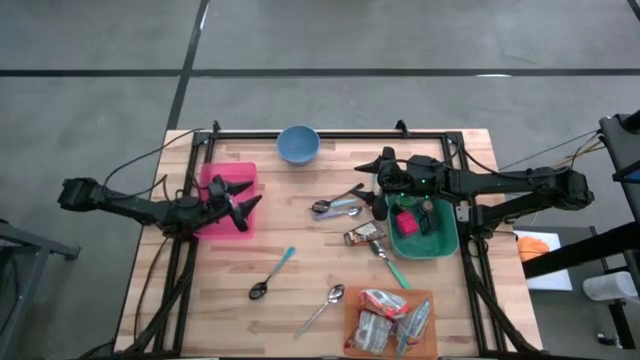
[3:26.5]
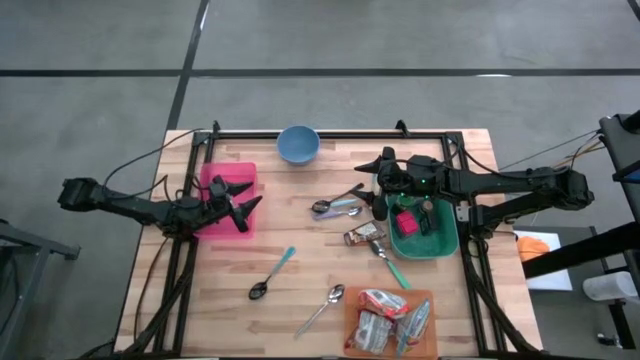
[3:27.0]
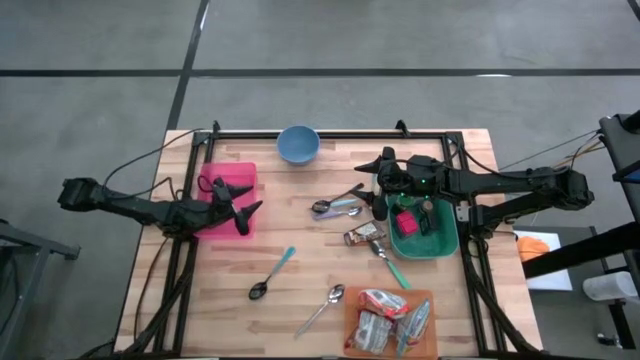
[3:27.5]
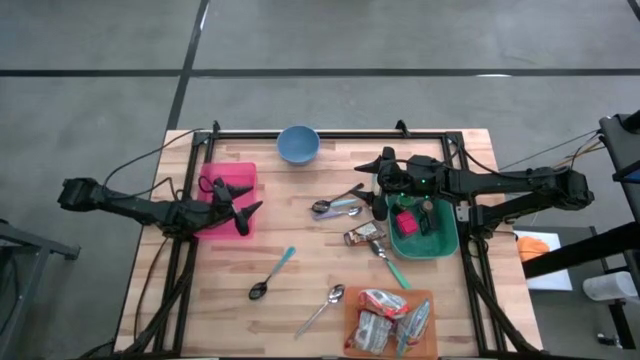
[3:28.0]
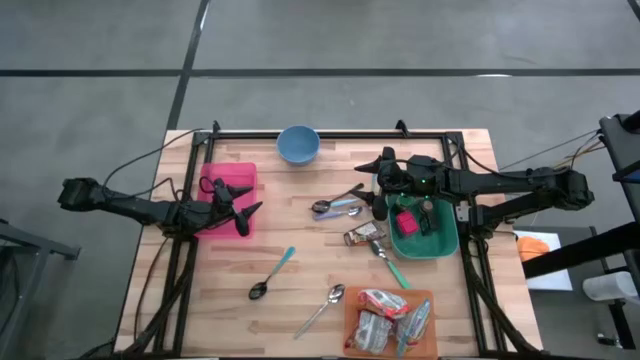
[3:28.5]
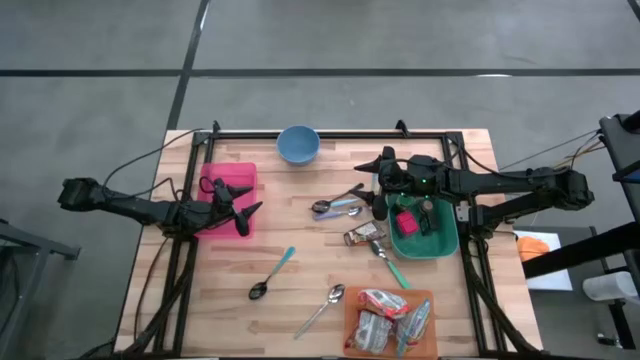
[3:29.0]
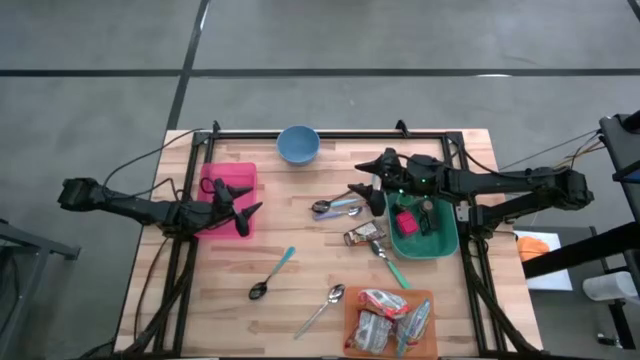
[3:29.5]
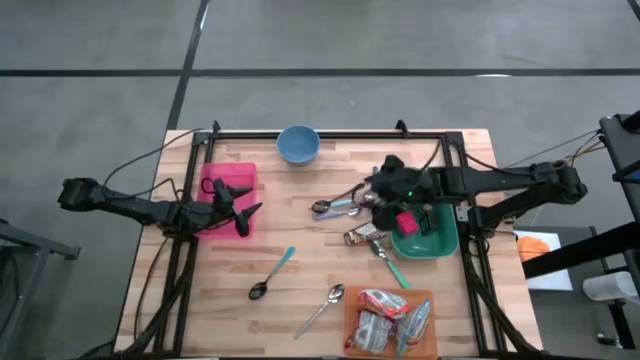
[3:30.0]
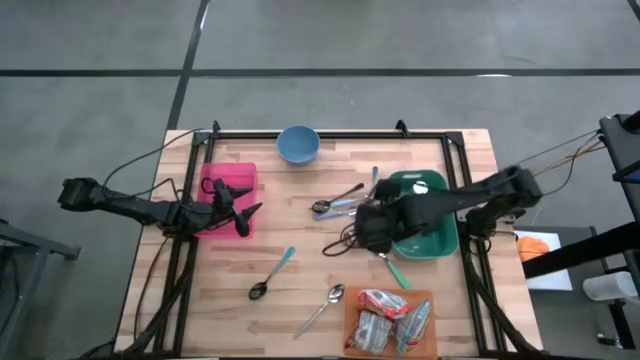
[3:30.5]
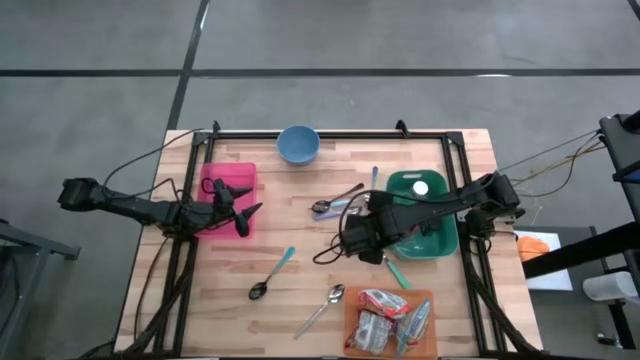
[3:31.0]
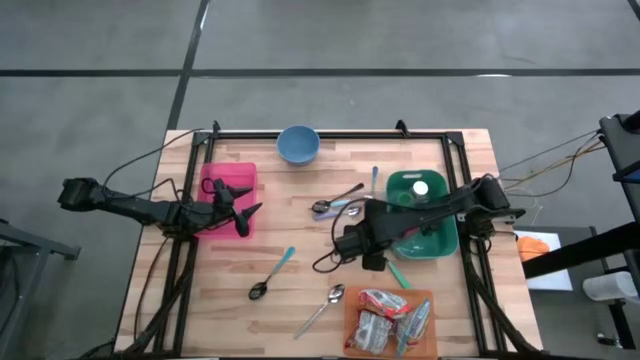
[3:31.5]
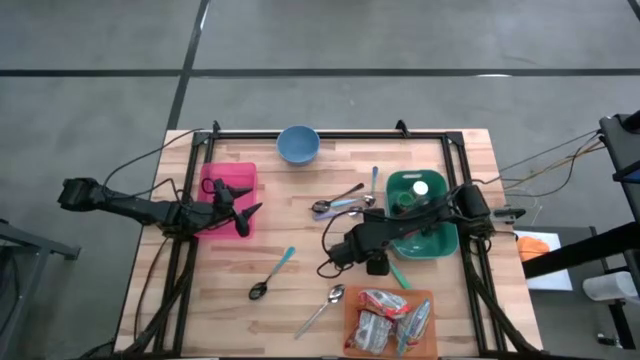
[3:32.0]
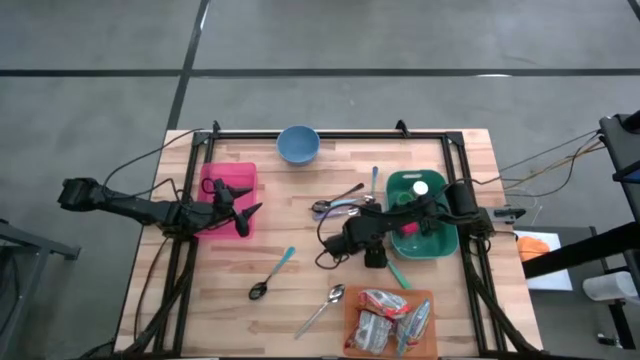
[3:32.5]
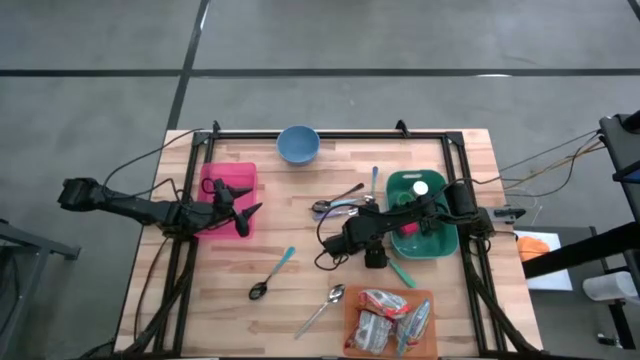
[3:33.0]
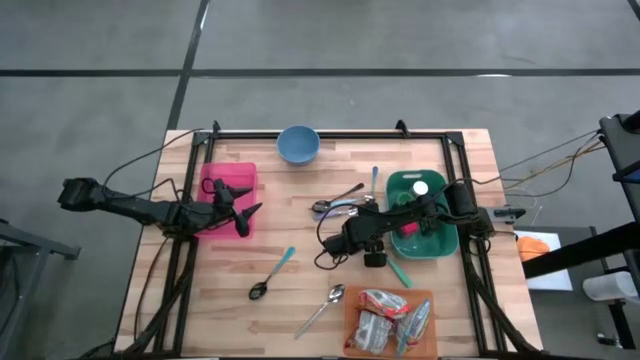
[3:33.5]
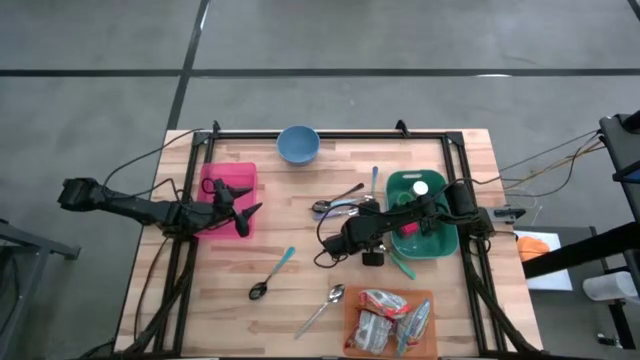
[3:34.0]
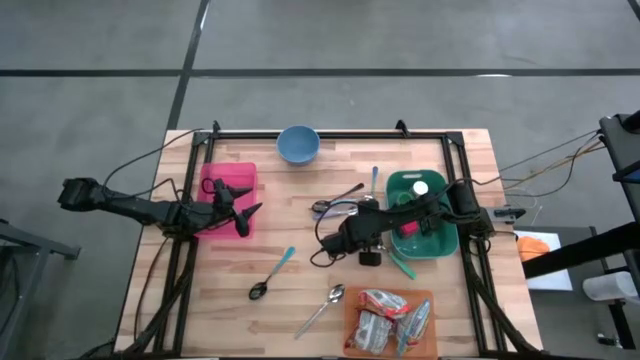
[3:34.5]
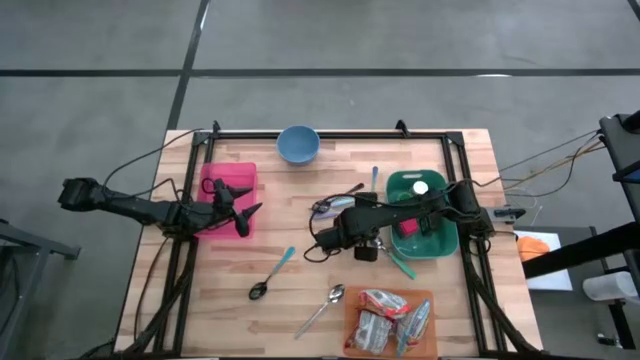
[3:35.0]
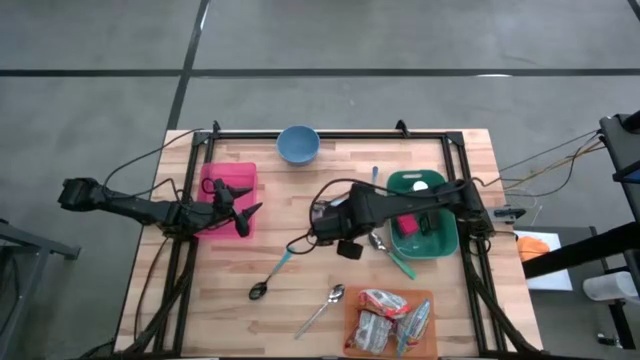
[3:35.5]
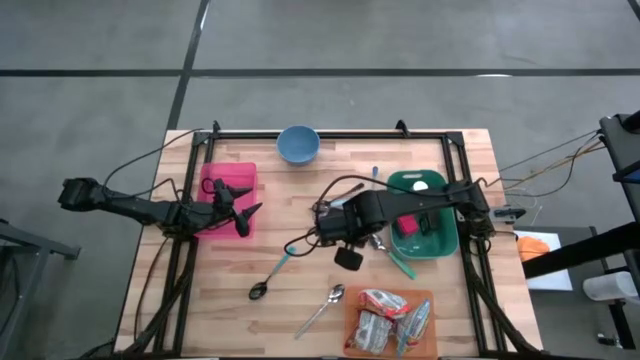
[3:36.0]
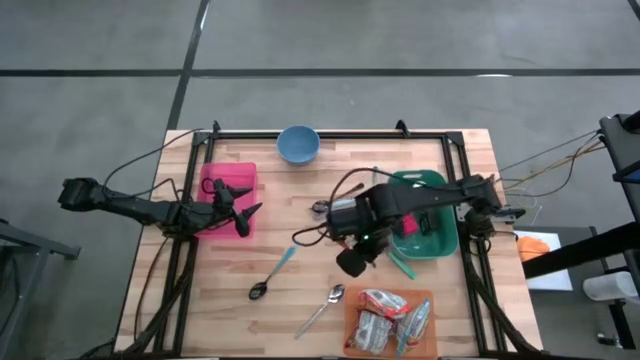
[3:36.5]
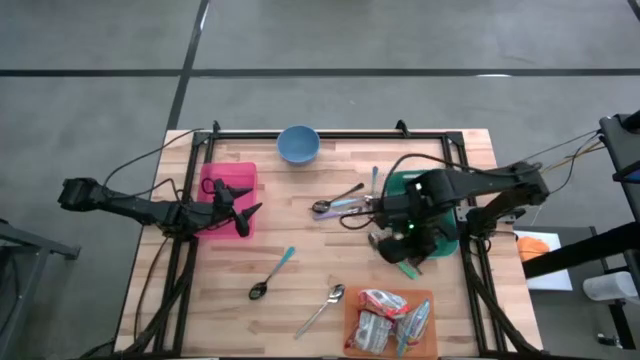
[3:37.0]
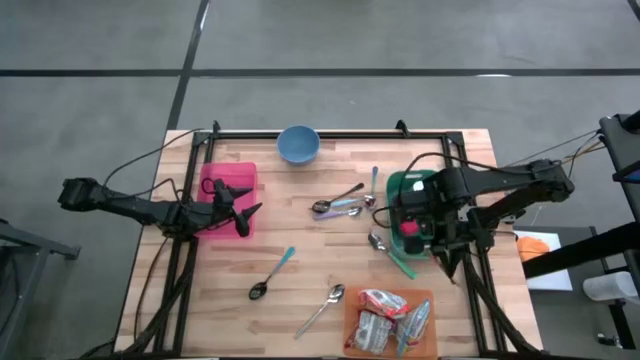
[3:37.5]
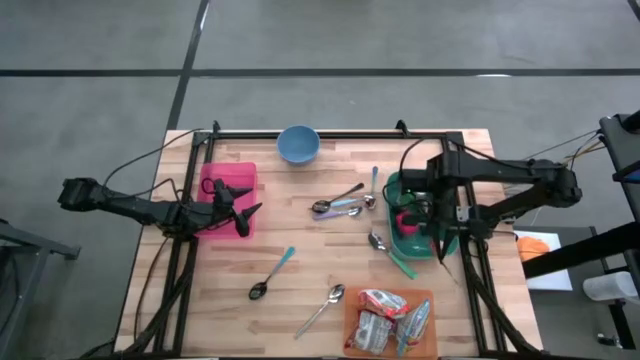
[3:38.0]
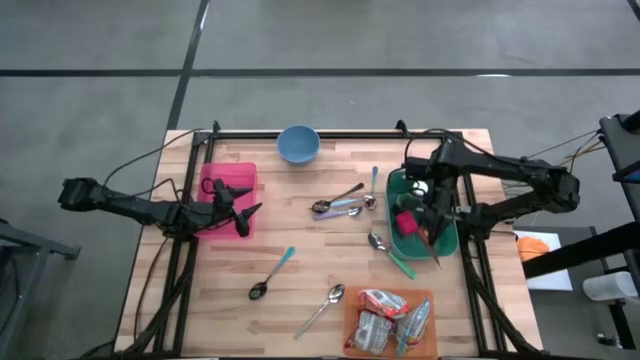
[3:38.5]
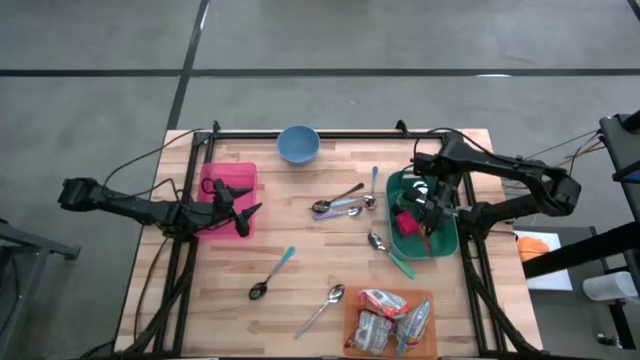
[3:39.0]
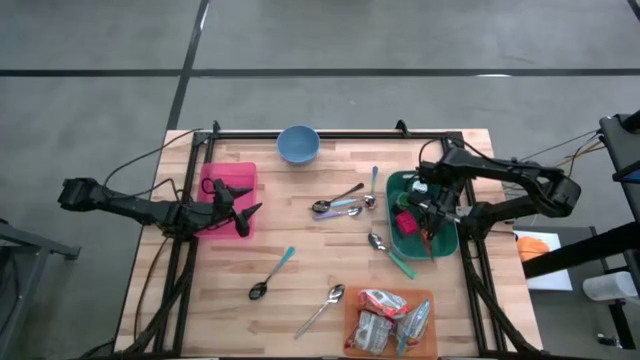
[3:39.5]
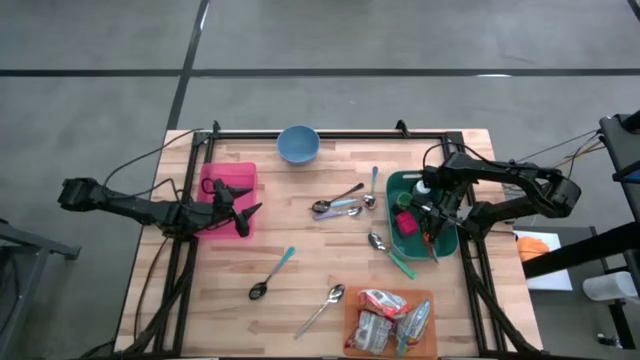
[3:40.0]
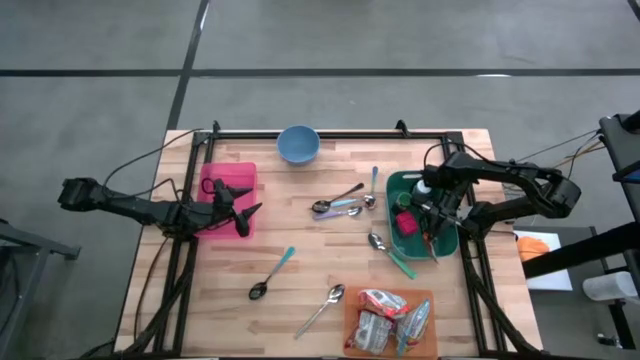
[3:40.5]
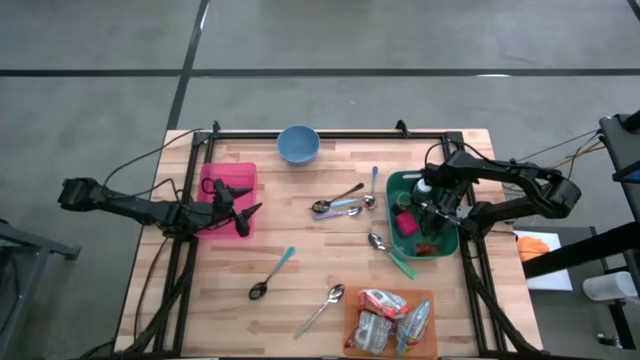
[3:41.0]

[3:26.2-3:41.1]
Put the orange seasoning pack into the green bin

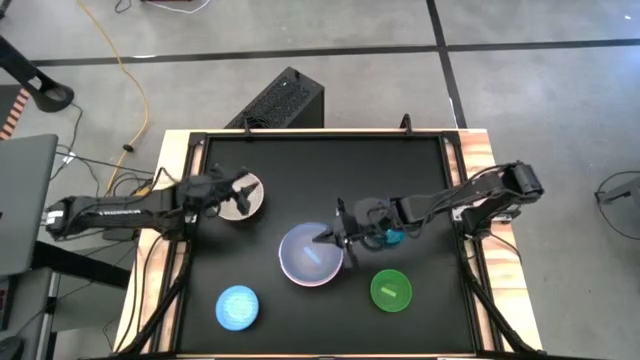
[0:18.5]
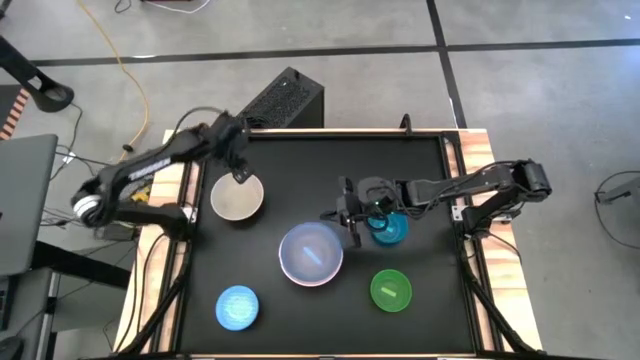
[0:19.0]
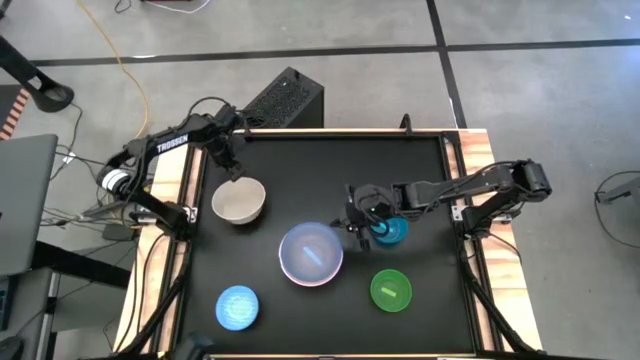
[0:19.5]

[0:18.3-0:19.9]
Stack the white bowl on top of the transparent blue bowl

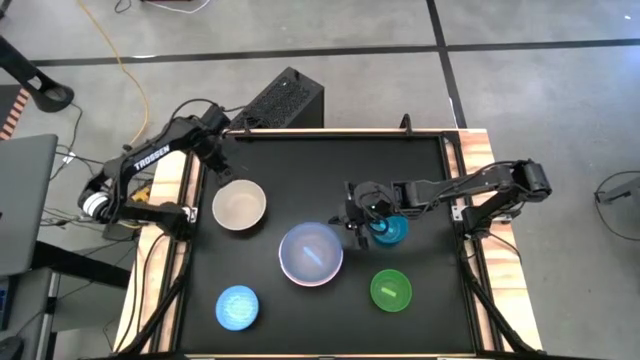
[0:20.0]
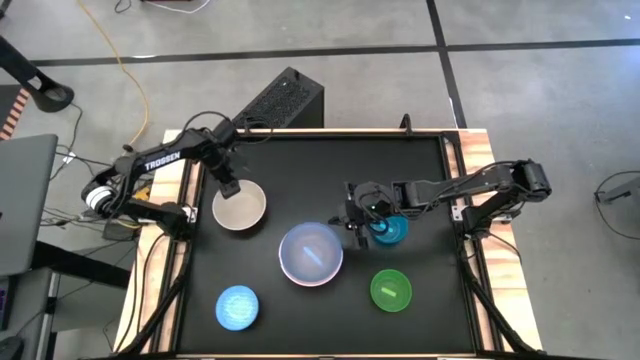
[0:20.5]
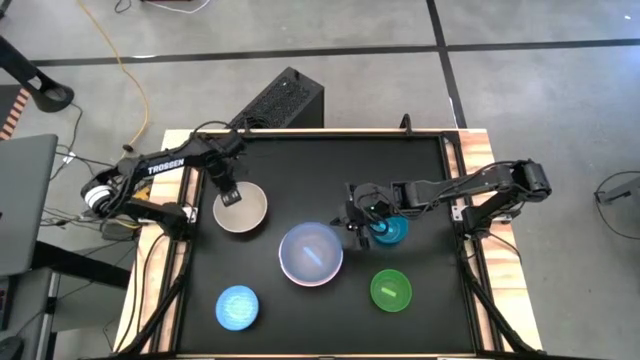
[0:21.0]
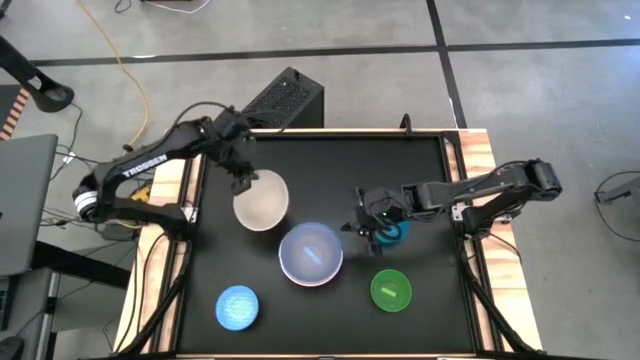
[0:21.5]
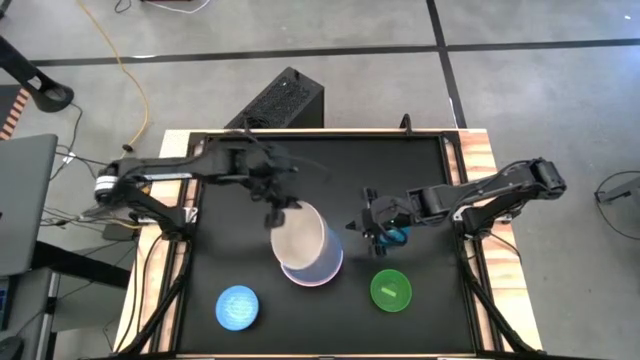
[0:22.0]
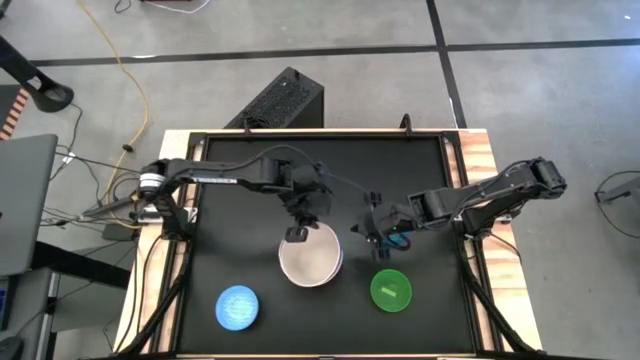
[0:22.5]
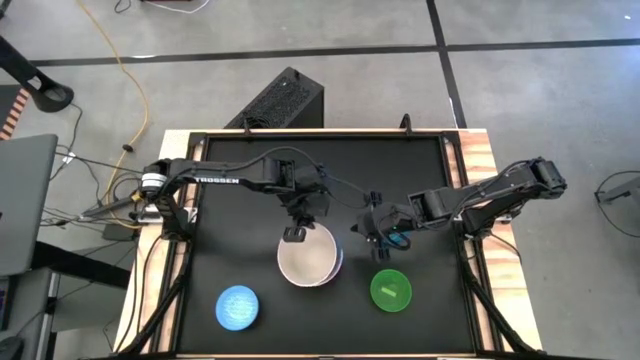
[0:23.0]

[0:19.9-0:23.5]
Stack the white bowl on top of the transparent blue bowl
